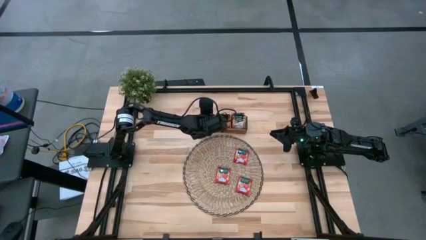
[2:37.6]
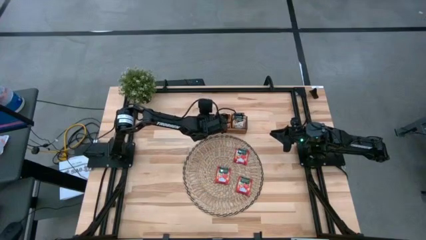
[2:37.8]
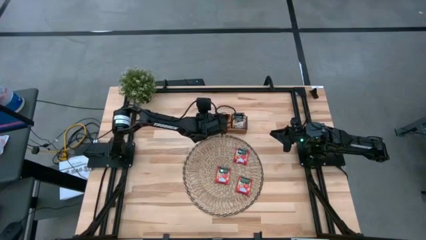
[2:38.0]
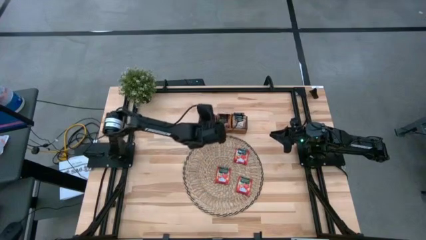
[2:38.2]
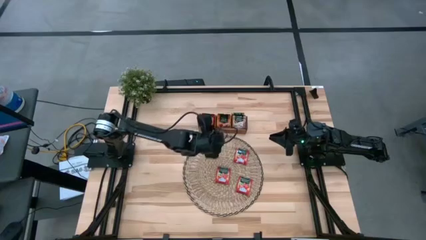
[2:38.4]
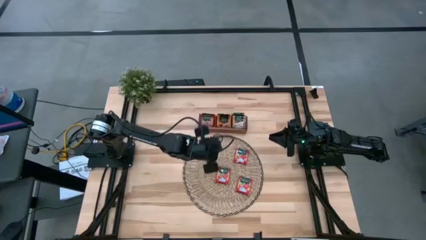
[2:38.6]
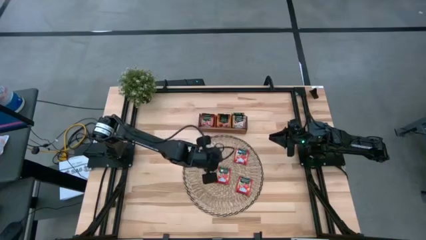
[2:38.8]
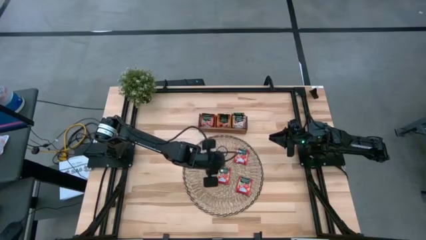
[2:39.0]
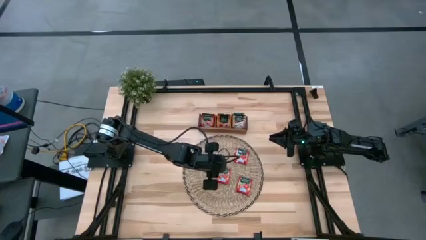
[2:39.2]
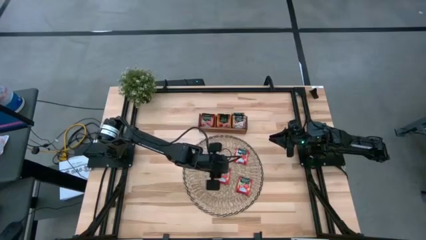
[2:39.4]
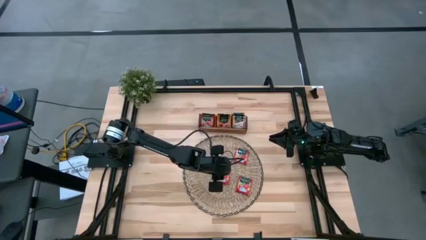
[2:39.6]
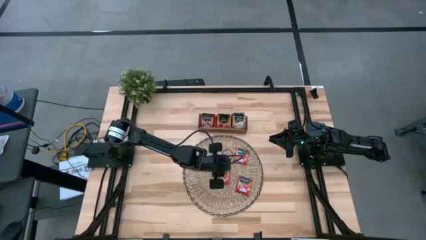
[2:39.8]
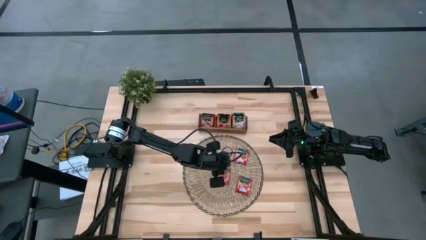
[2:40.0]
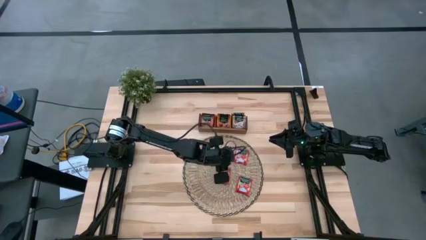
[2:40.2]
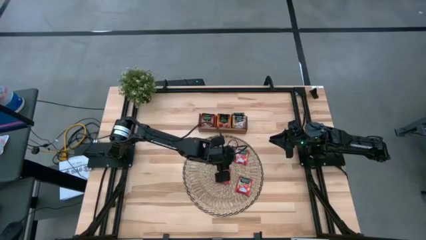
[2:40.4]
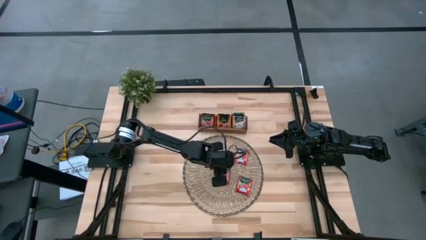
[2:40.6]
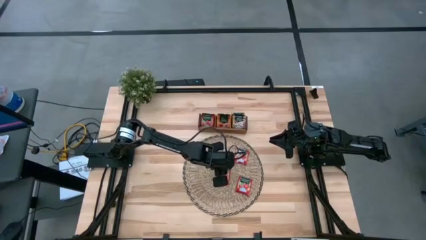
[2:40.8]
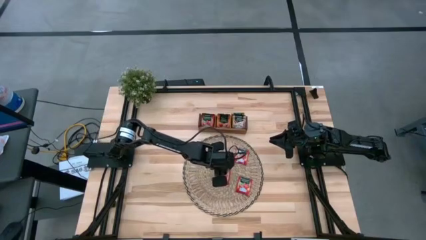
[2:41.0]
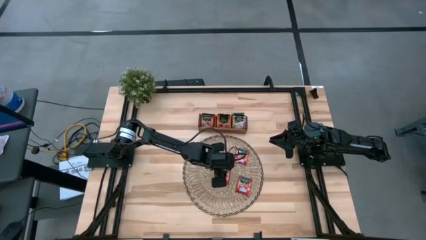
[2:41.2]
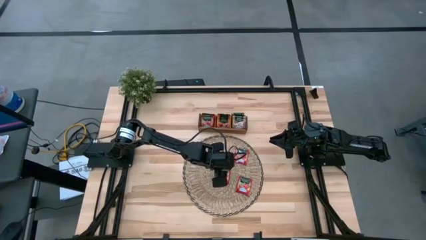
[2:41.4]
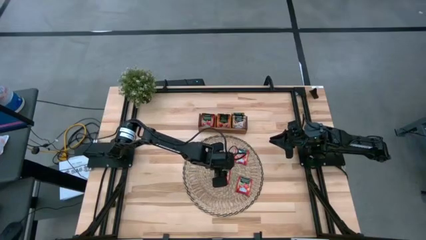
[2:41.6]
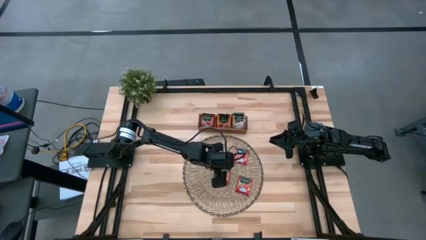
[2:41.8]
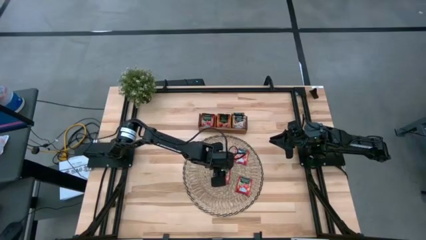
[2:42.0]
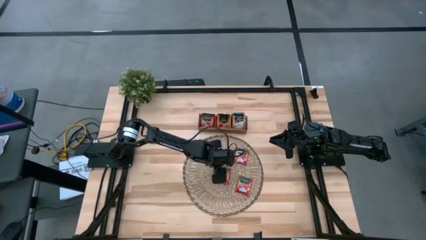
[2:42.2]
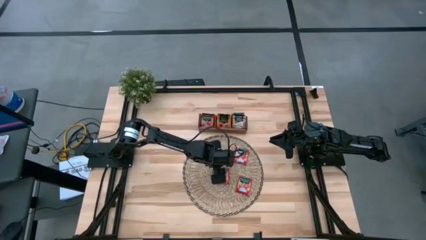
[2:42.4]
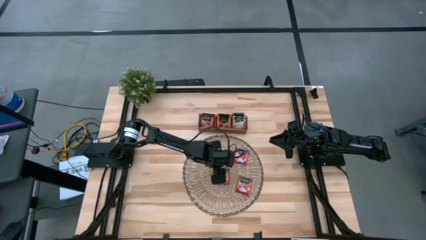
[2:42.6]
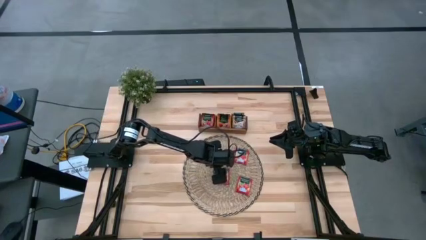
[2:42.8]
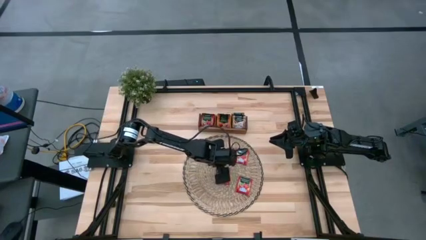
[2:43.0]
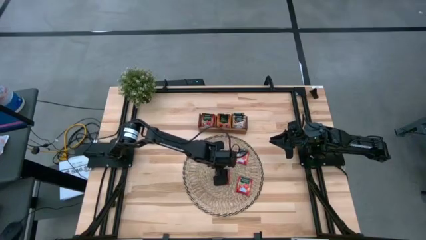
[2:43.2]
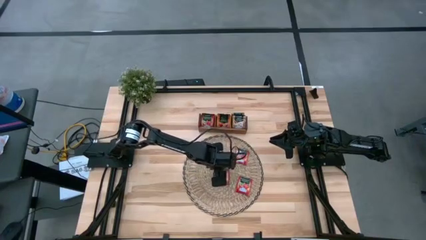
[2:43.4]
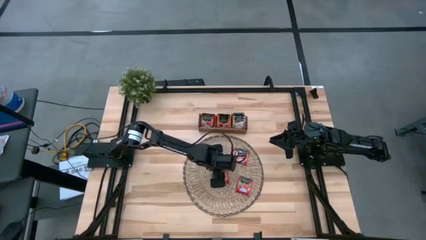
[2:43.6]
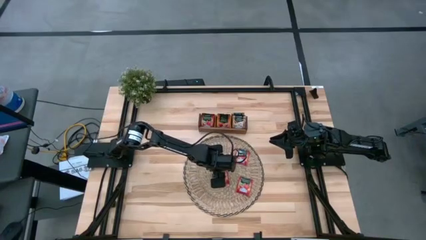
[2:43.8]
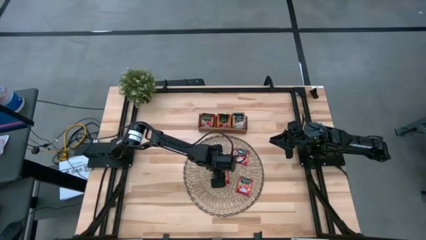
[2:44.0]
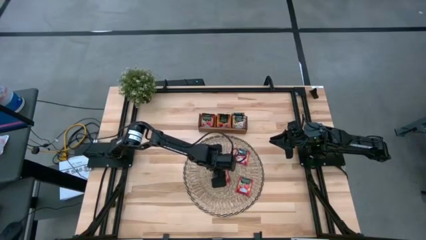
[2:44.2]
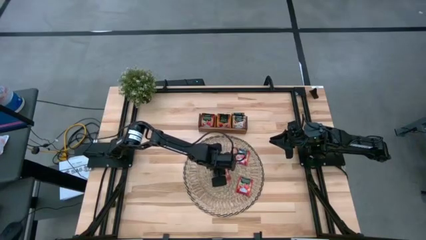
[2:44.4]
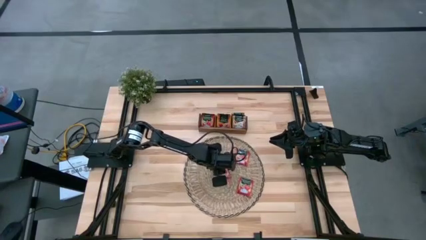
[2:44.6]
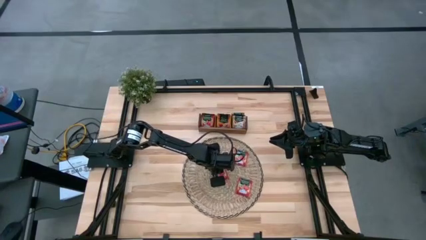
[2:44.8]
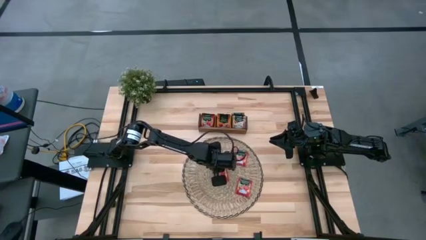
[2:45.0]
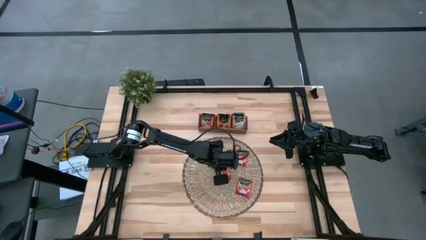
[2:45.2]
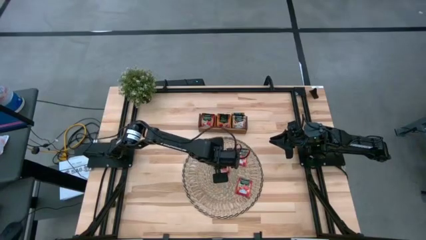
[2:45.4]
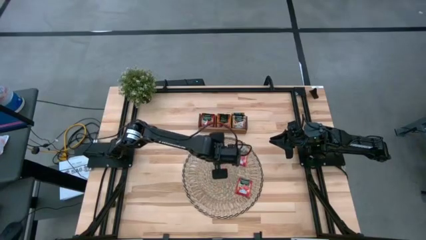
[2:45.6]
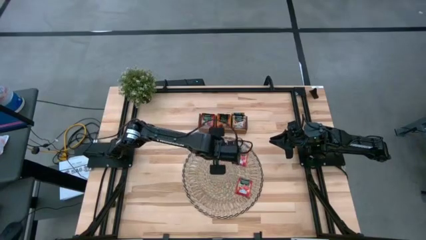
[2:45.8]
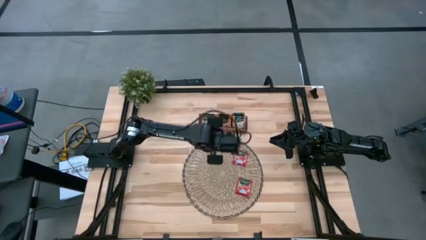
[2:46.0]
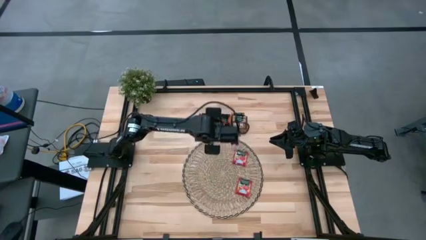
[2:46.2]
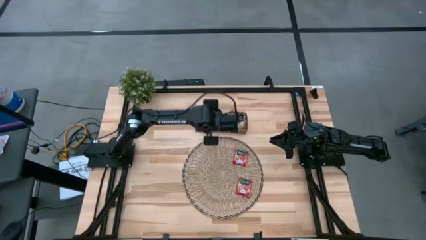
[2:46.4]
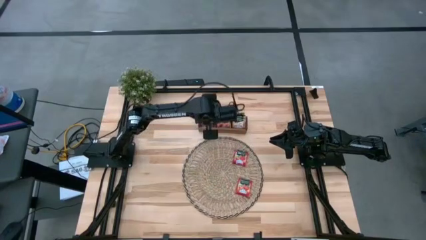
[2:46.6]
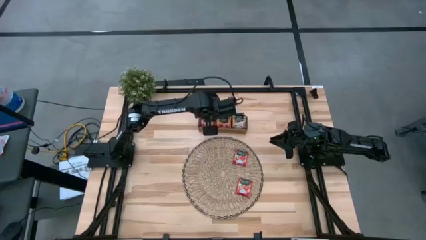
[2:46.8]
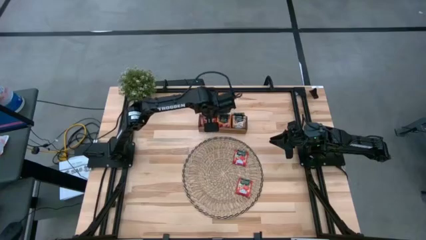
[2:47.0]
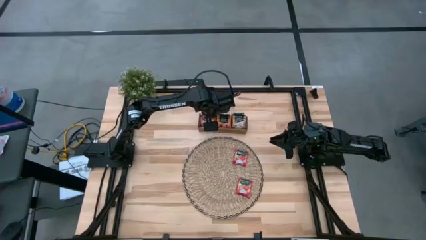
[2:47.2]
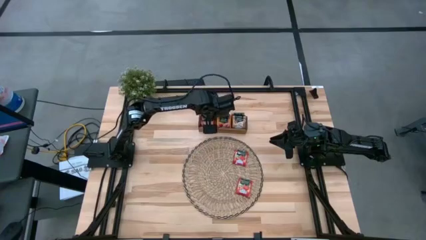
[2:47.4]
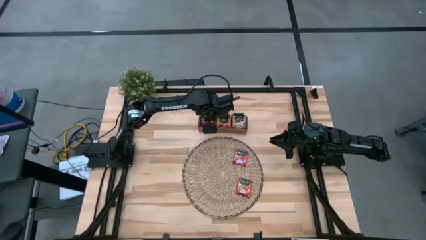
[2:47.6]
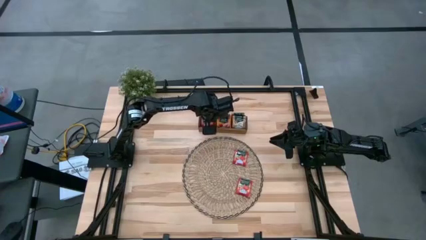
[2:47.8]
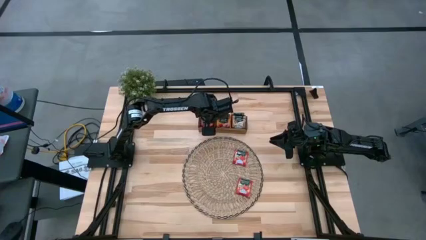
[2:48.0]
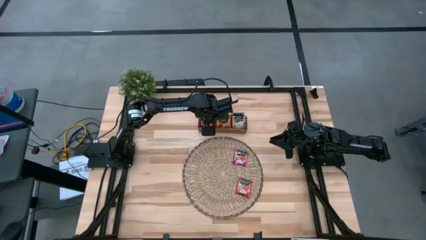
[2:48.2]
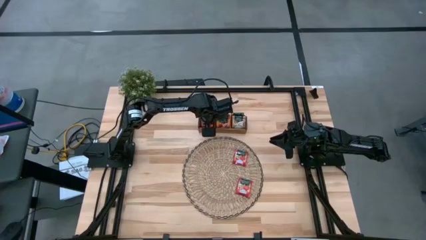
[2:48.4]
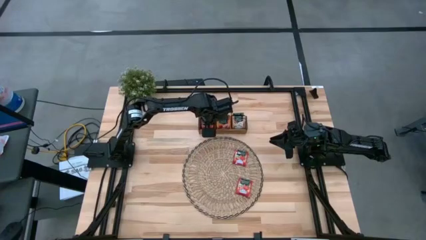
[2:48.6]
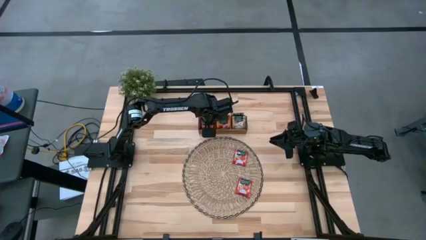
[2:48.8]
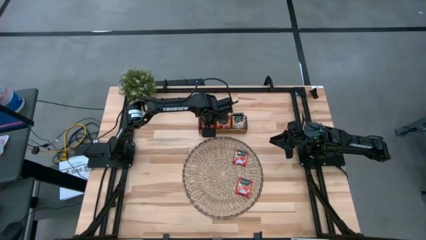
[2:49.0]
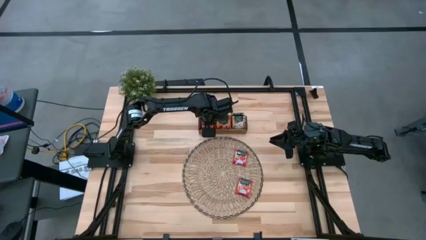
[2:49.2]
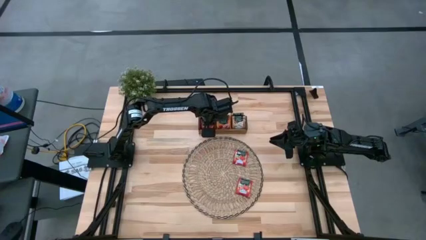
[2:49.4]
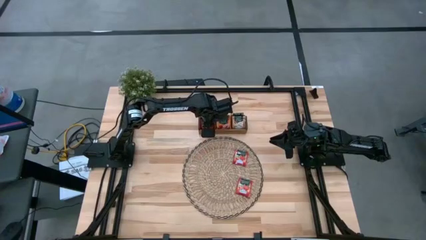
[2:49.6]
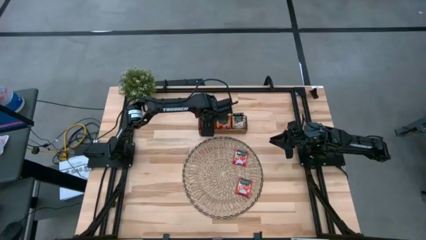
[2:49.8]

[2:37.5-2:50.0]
Task: Pick & Place Tea
Put the red tea bag into the left section of the wooden organizer

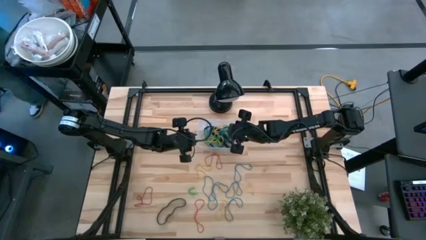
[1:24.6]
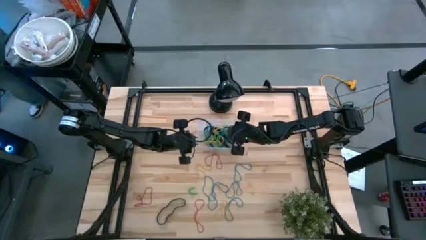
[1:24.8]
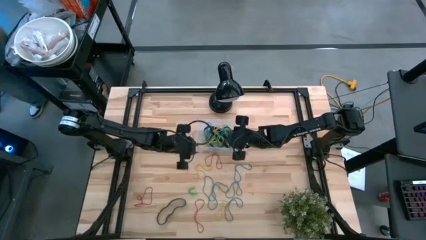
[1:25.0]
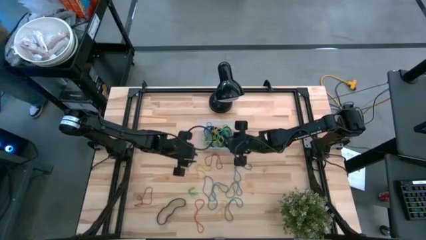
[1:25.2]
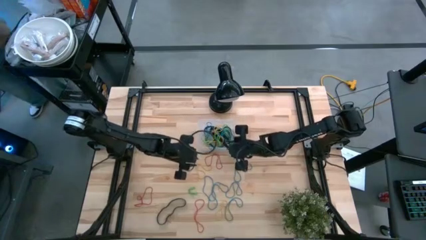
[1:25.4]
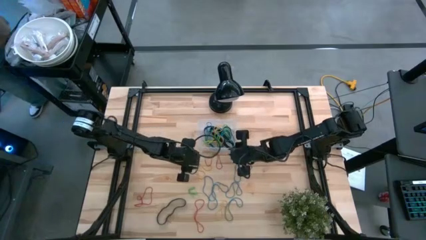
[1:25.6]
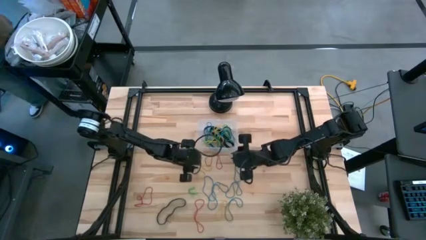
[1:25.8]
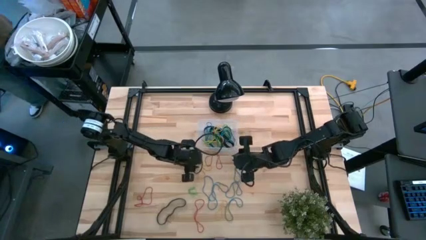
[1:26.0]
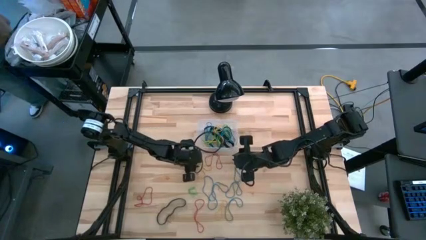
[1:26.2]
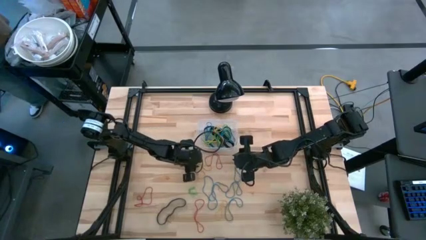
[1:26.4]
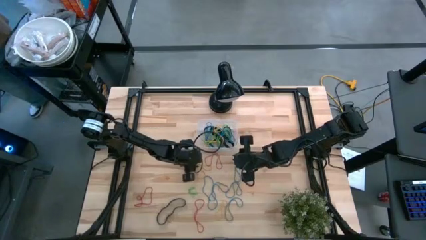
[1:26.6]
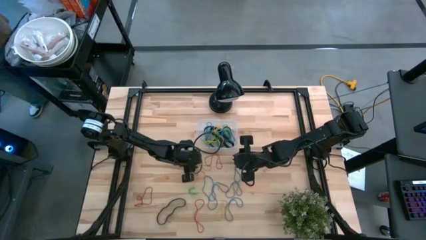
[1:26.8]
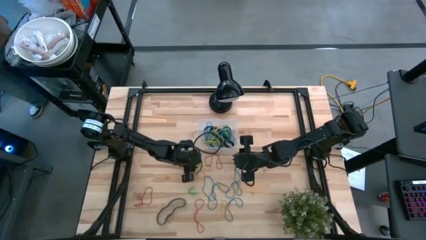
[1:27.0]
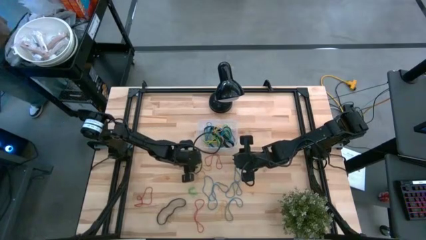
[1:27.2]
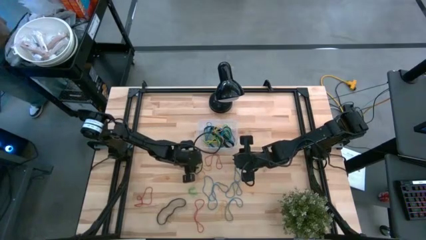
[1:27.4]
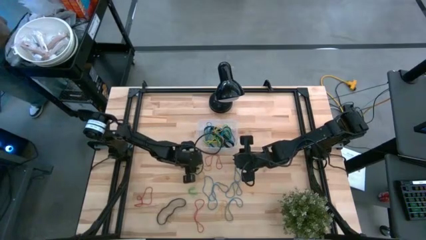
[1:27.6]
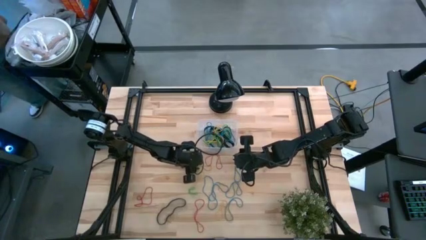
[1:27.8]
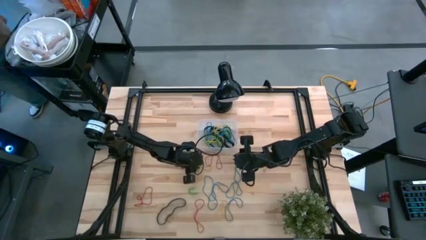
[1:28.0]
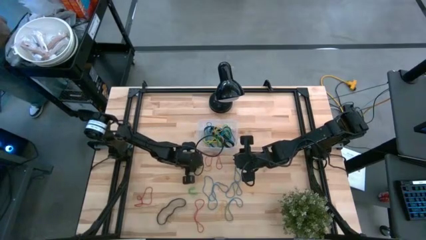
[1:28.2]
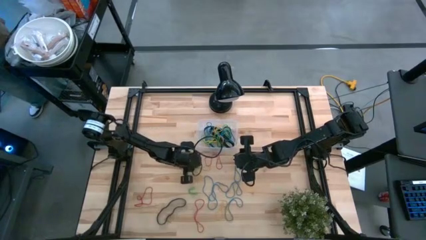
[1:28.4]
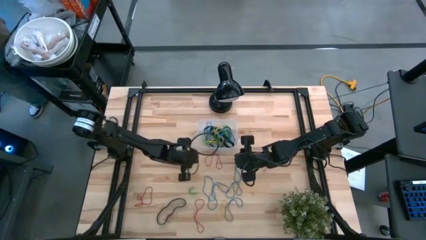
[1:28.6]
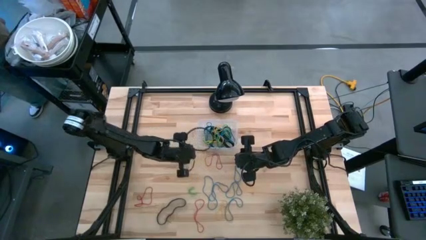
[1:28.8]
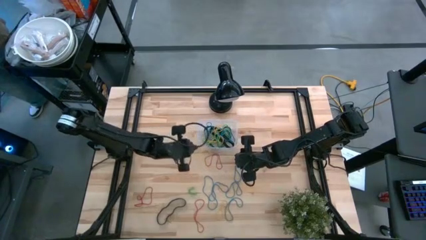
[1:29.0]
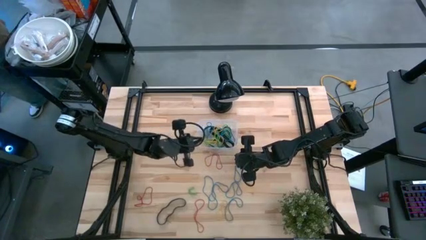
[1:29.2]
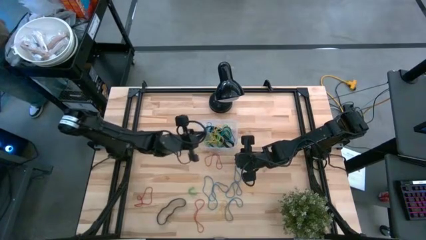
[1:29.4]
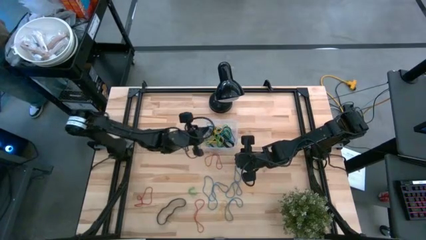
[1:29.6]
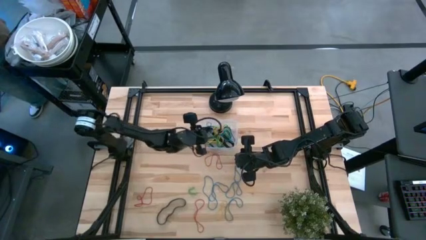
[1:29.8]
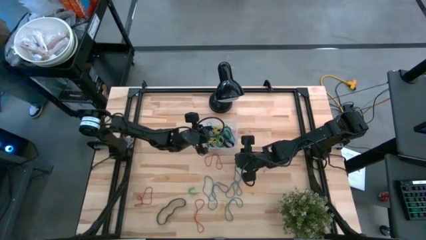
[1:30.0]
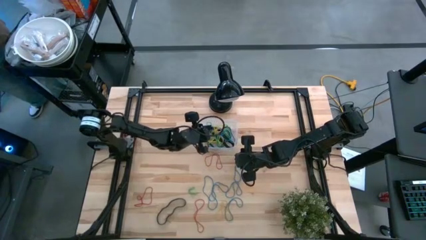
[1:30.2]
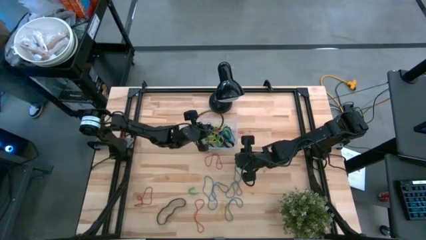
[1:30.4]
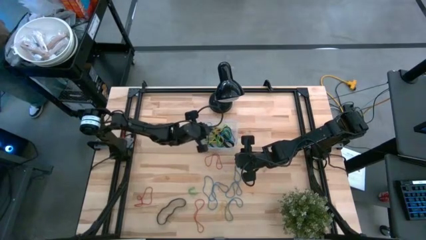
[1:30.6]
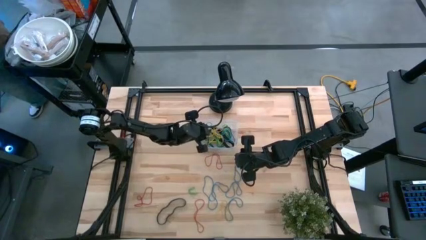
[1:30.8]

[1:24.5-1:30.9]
Task: Pick and place rubber bands into bin
Put the yellow rubber band into the transparent bin
